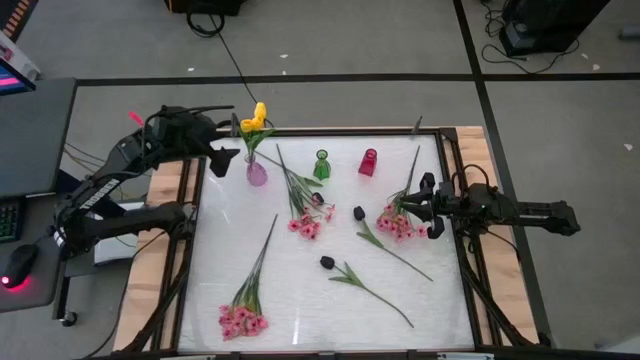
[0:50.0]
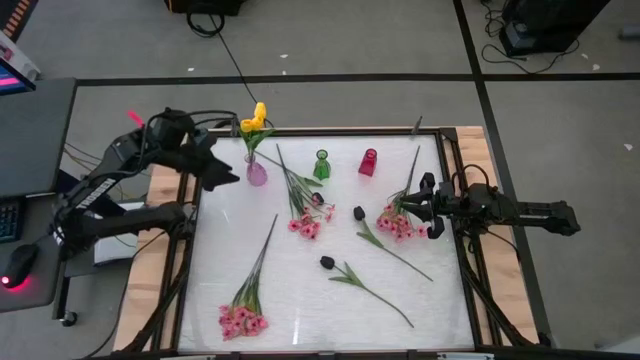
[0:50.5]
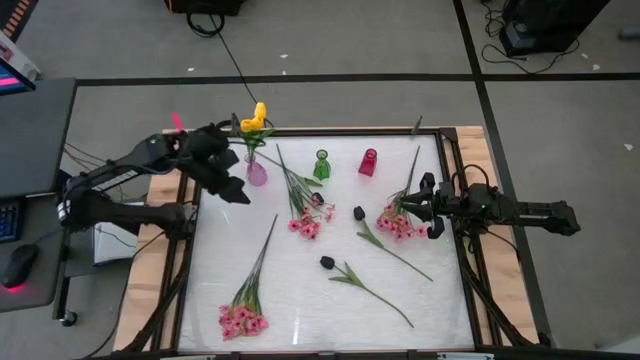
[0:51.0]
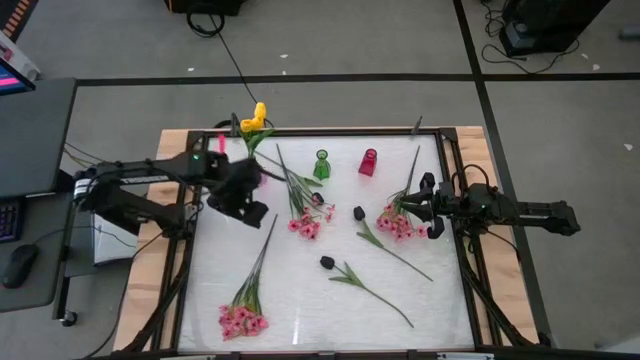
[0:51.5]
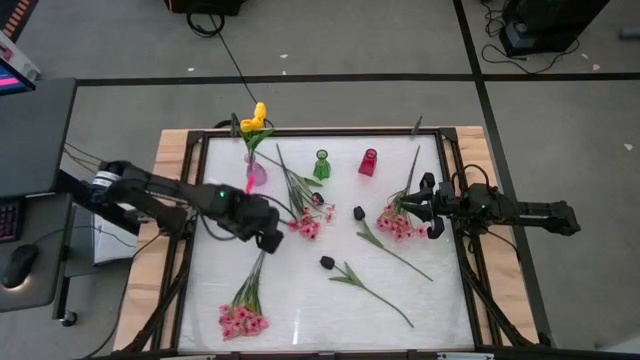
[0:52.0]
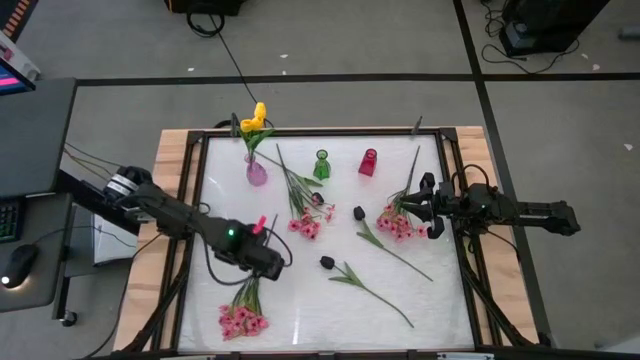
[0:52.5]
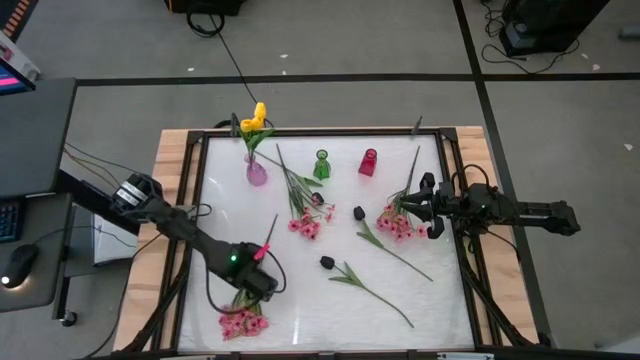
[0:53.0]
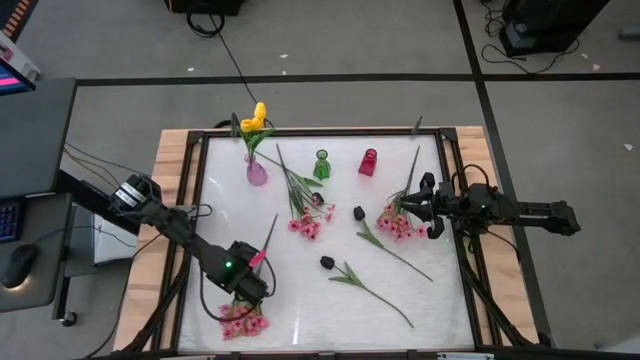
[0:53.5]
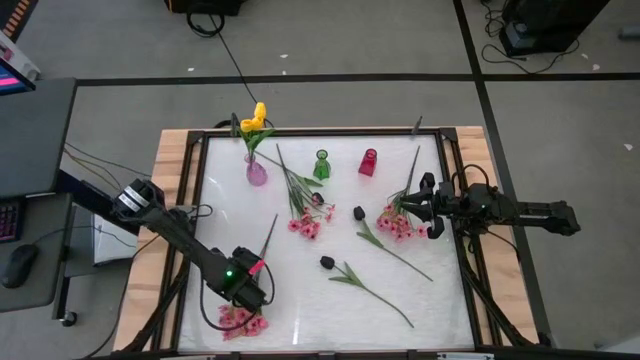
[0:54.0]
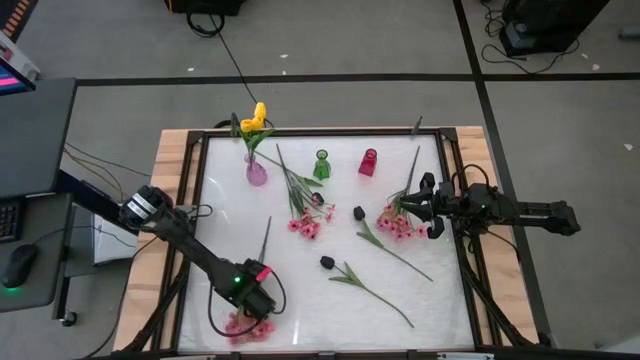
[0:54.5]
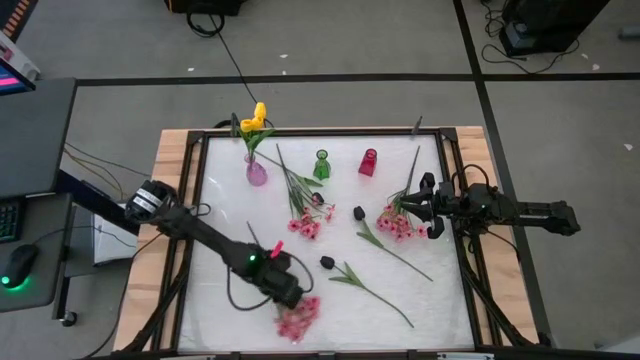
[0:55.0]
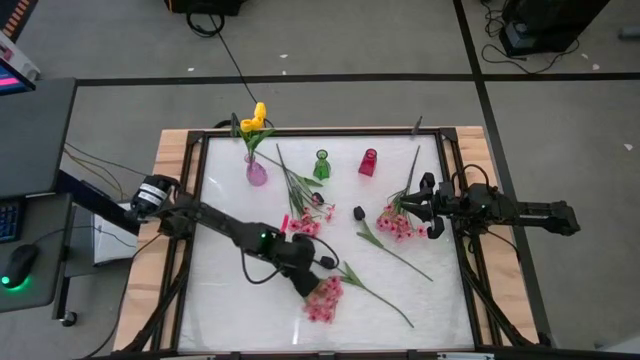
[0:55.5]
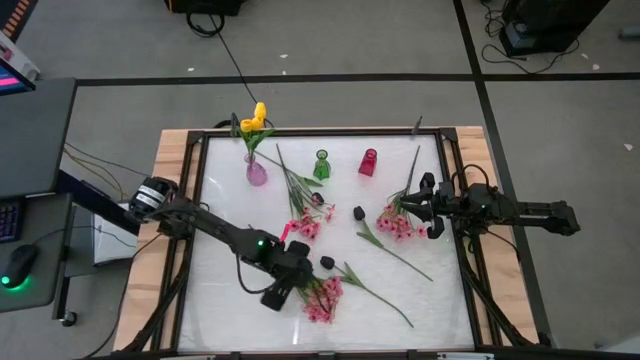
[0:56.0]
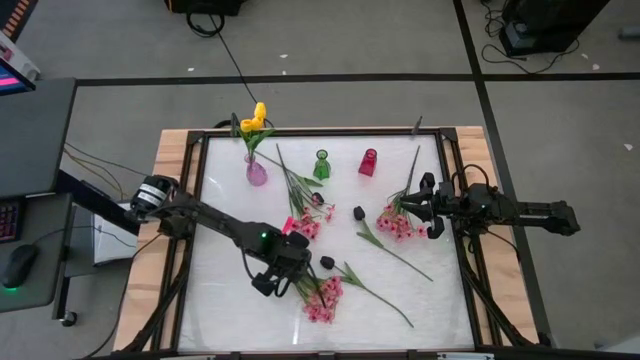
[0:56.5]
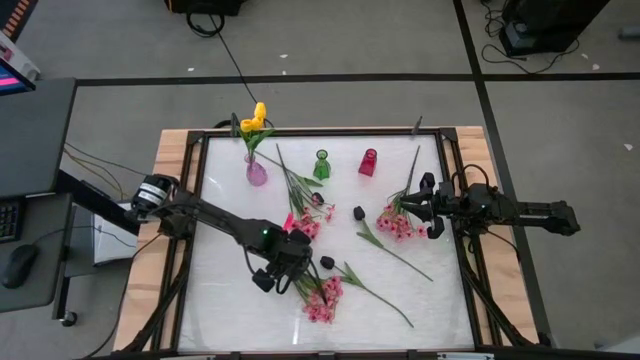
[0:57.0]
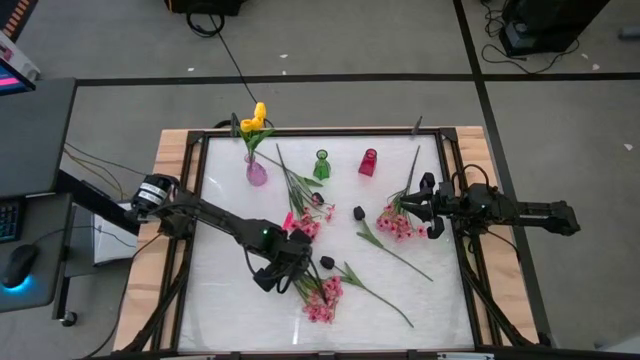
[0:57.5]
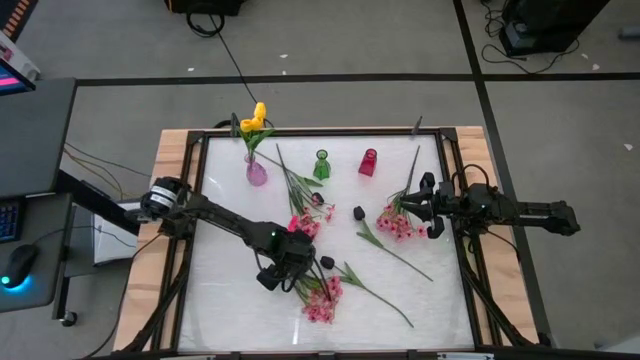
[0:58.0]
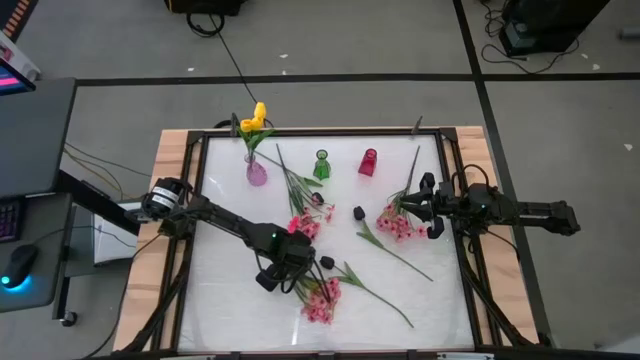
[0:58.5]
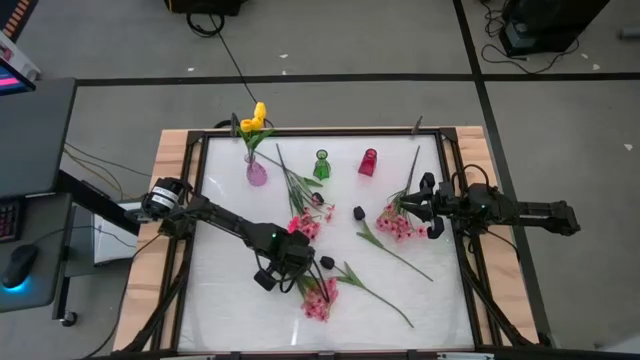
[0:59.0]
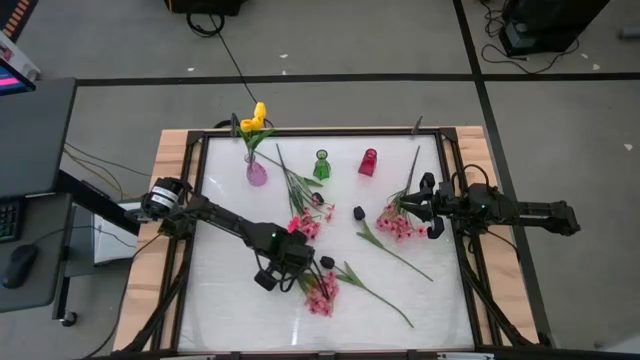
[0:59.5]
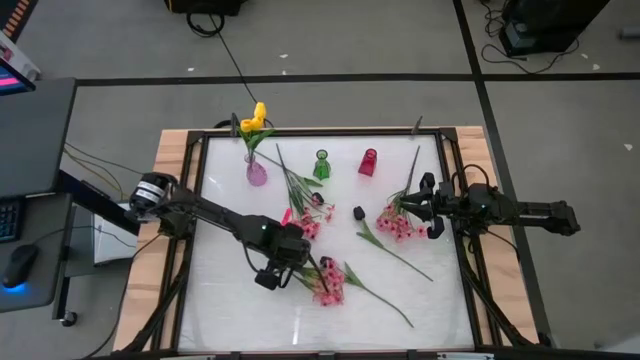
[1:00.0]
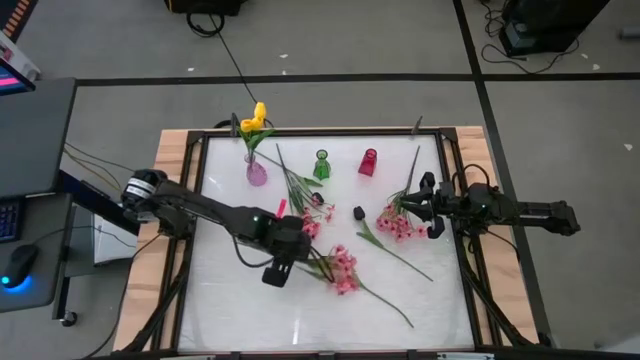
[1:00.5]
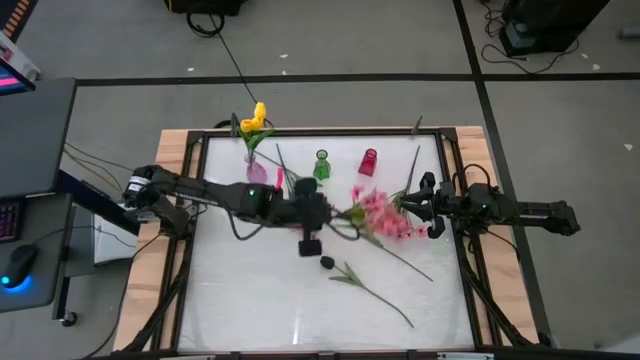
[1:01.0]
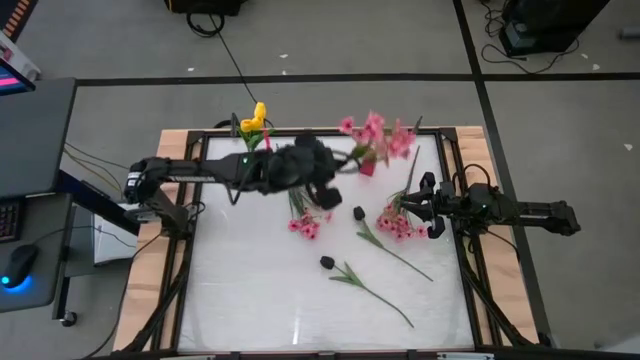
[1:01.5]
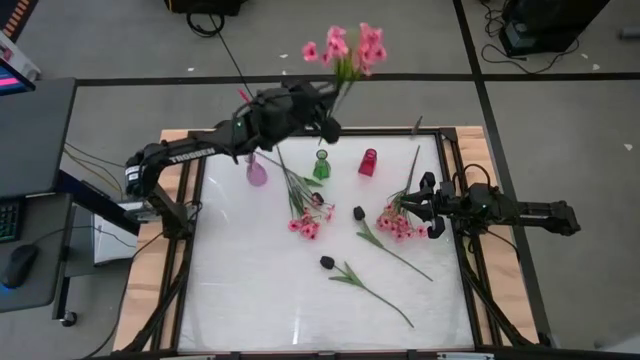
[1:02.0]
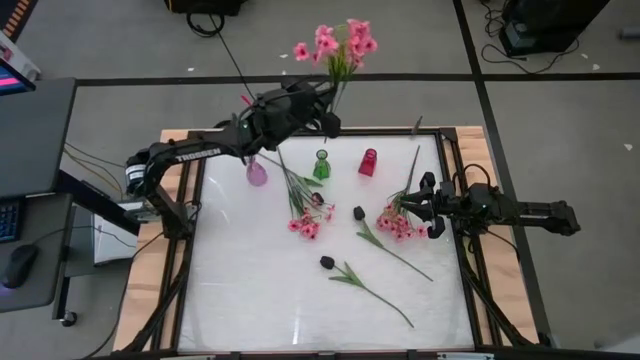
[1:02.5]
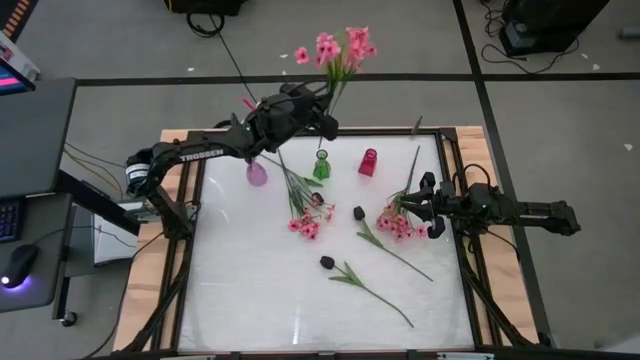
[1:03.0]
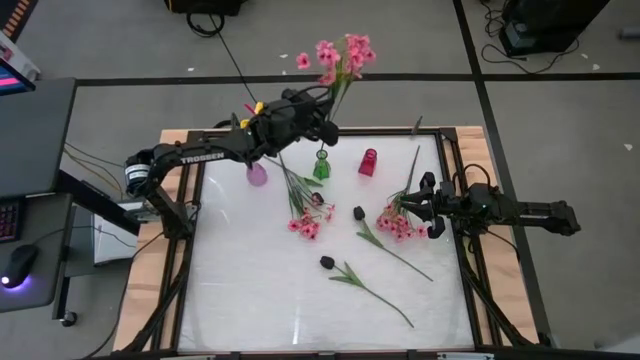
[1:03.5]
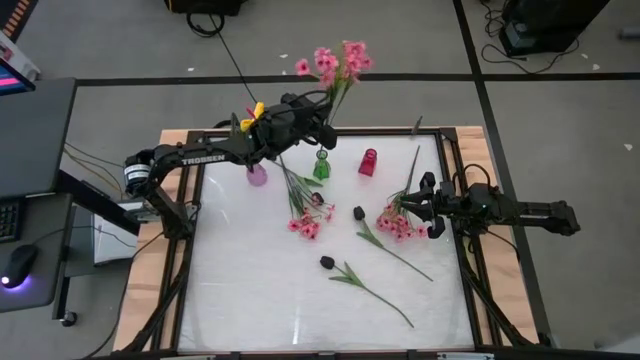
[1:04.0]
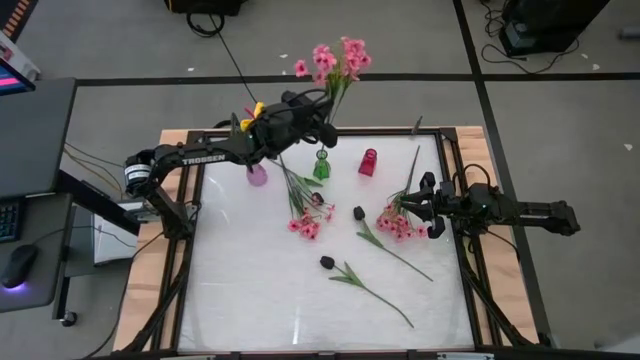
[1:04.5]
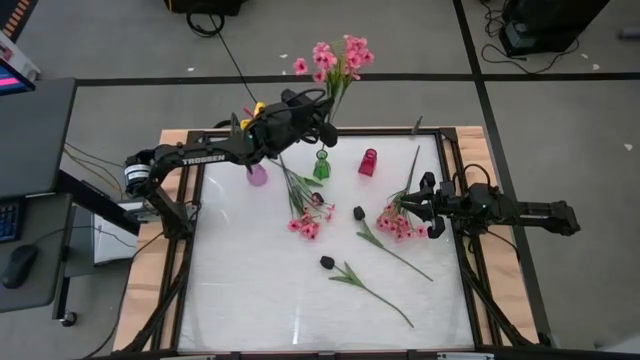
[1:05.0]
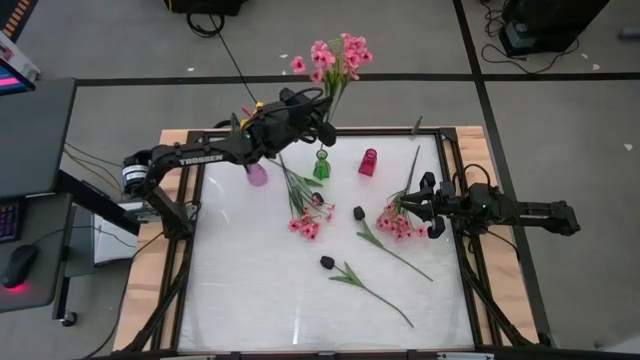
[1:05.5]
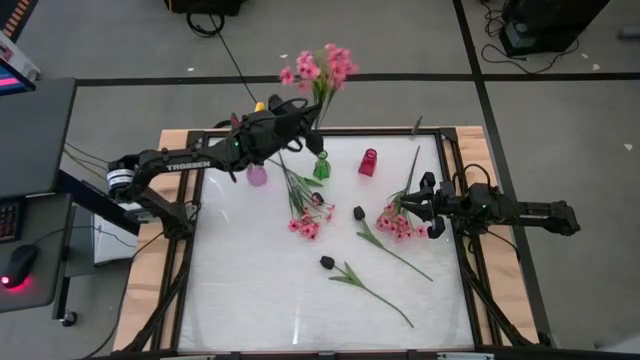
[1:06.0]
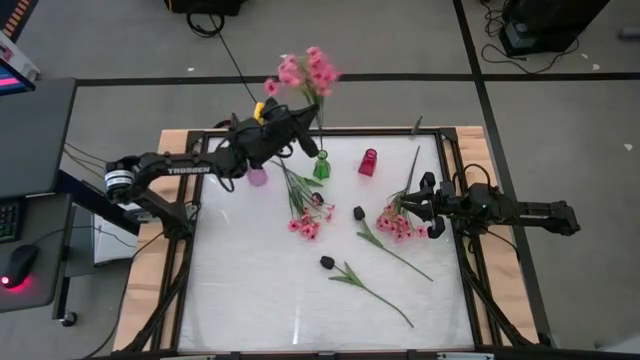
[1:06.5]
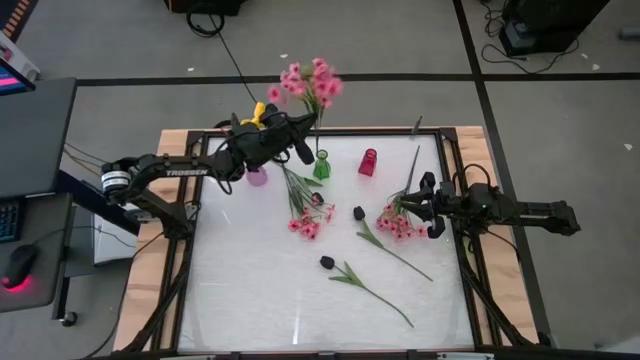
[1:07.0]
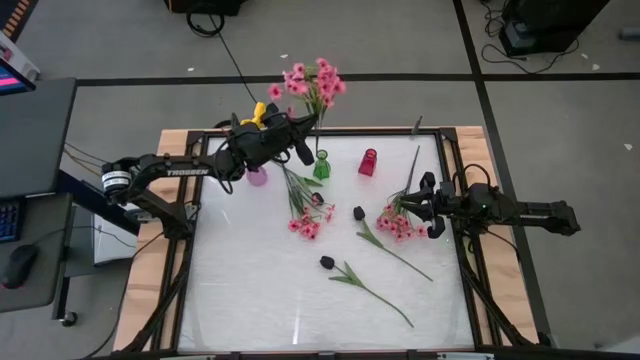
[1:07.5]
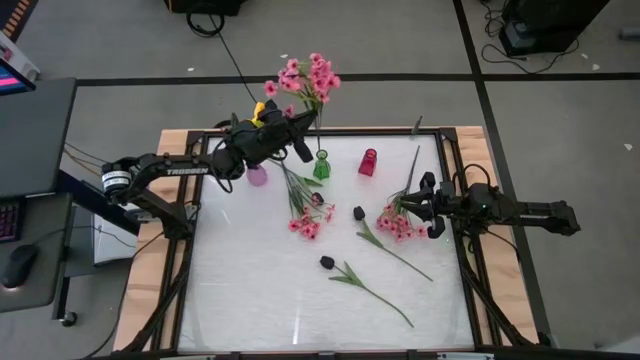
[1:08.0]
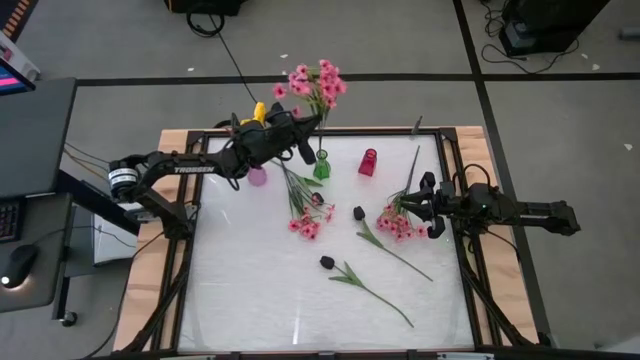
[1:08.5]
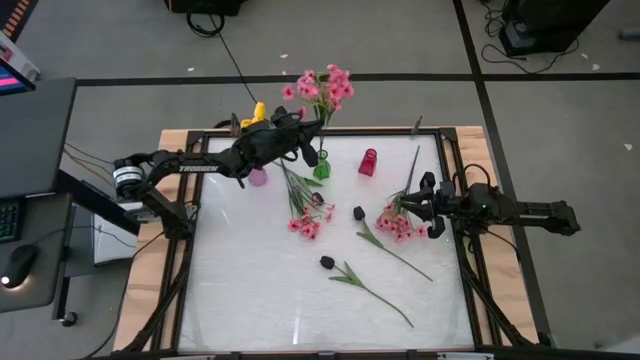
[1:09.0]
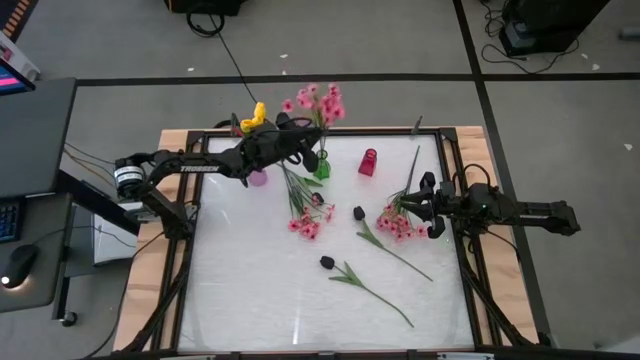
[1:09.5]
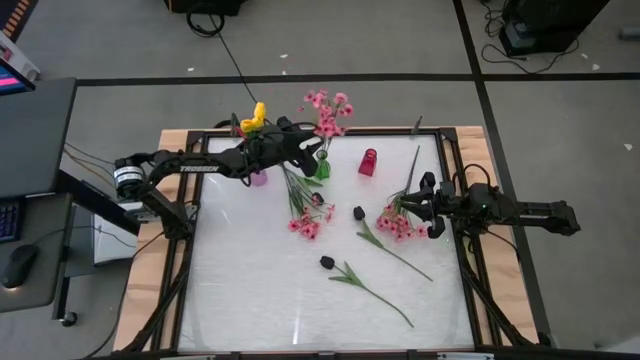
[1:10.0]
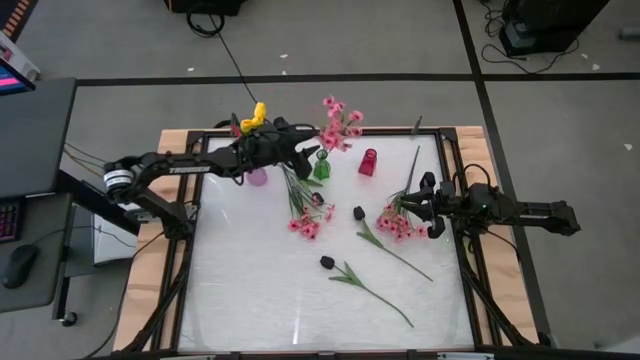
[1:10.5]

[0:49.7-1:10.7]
Task: Sort flowers into vase by color
Put the bottom pink flower into the green vase
